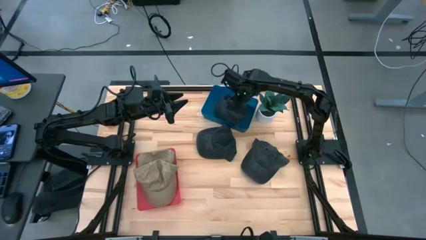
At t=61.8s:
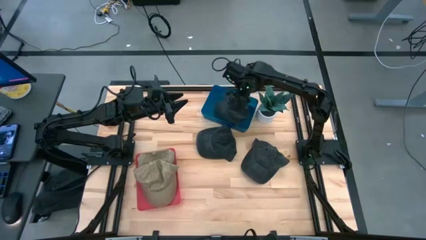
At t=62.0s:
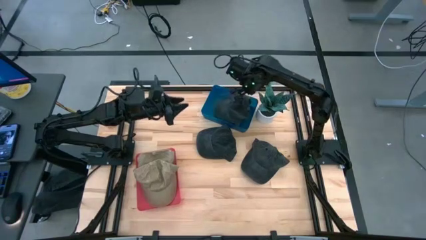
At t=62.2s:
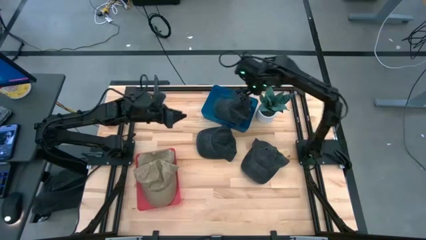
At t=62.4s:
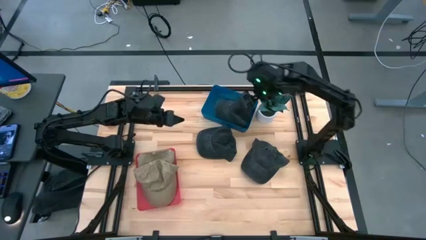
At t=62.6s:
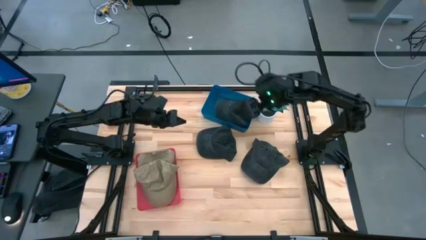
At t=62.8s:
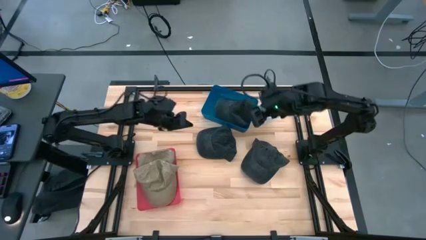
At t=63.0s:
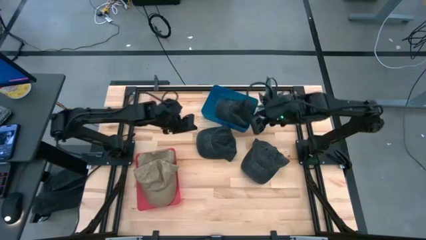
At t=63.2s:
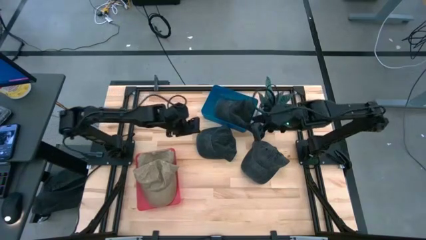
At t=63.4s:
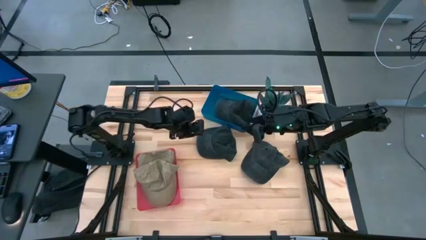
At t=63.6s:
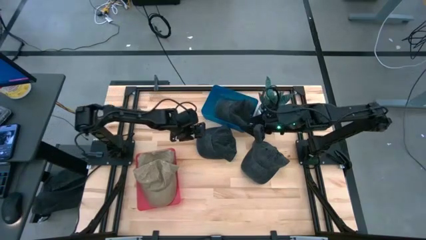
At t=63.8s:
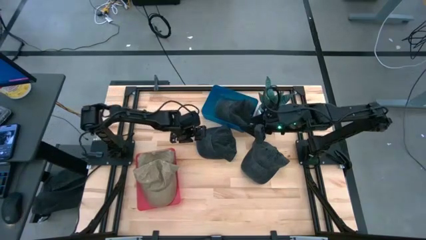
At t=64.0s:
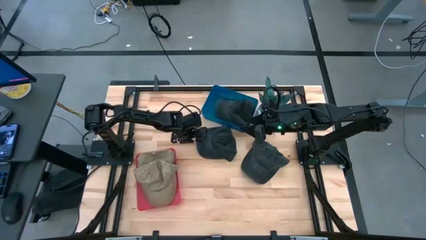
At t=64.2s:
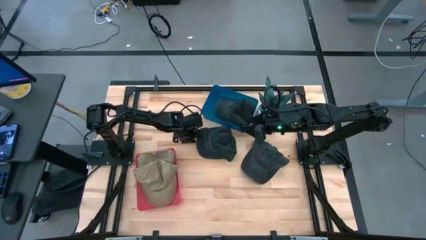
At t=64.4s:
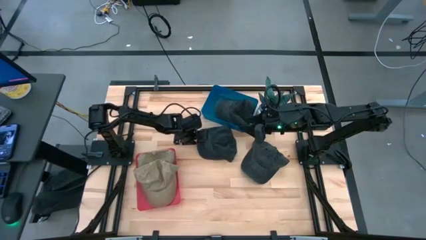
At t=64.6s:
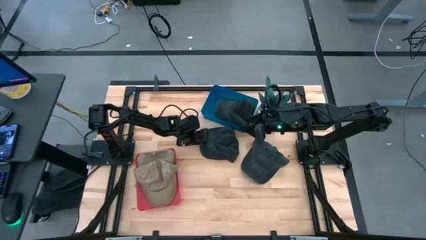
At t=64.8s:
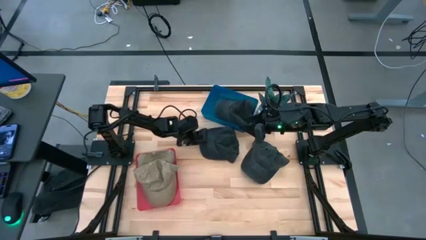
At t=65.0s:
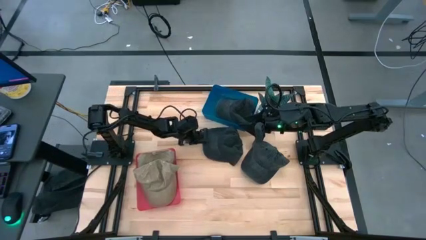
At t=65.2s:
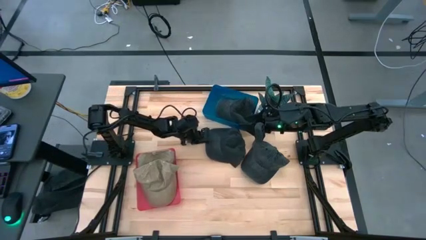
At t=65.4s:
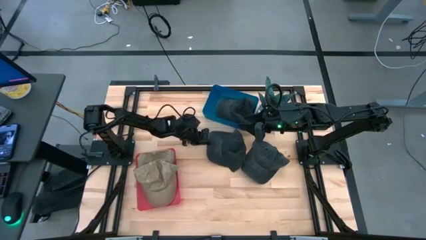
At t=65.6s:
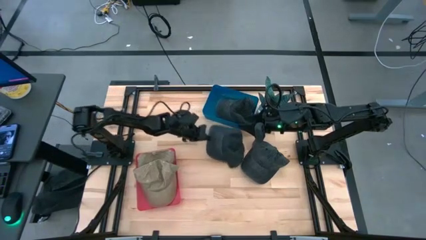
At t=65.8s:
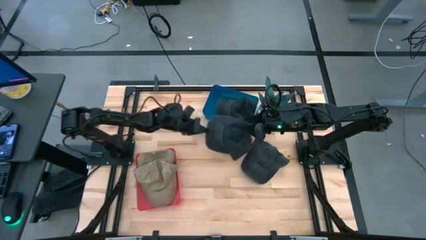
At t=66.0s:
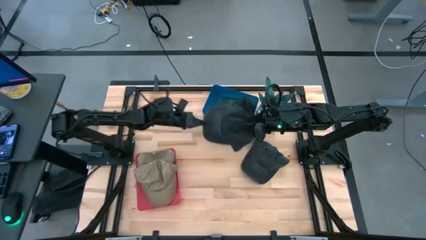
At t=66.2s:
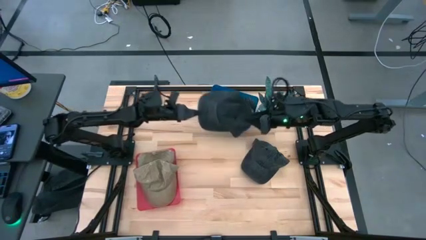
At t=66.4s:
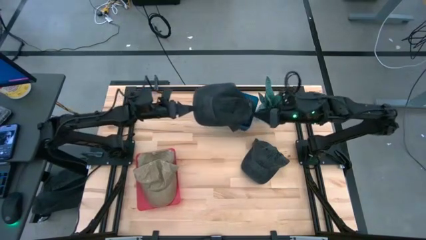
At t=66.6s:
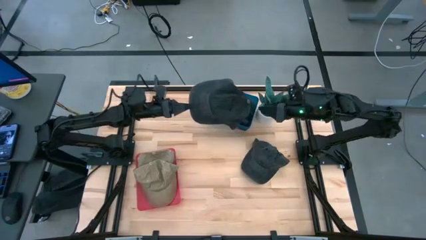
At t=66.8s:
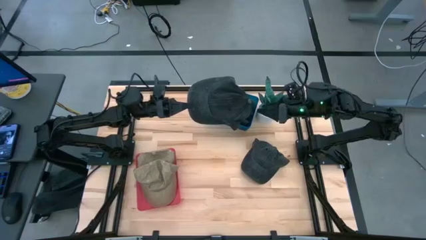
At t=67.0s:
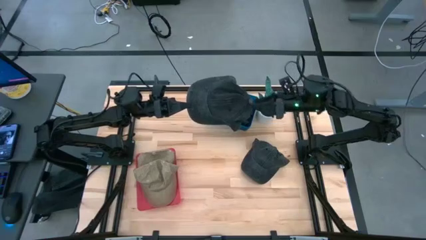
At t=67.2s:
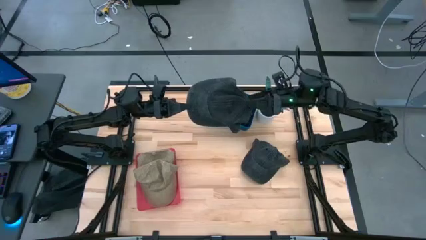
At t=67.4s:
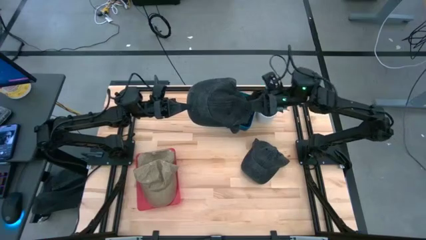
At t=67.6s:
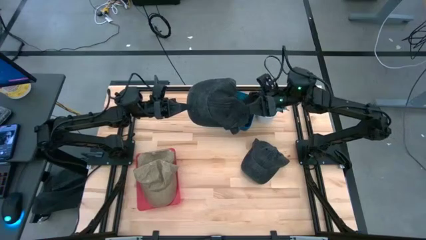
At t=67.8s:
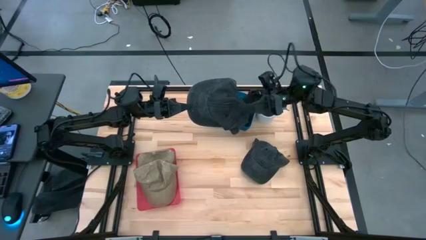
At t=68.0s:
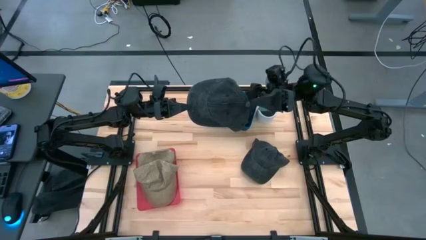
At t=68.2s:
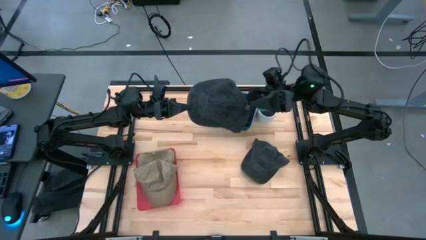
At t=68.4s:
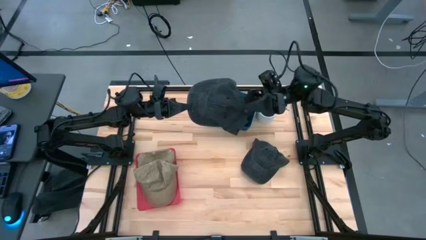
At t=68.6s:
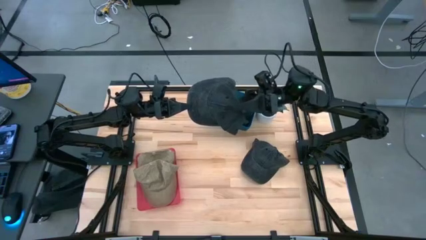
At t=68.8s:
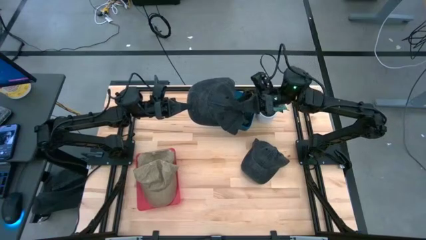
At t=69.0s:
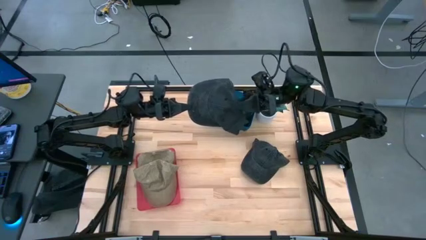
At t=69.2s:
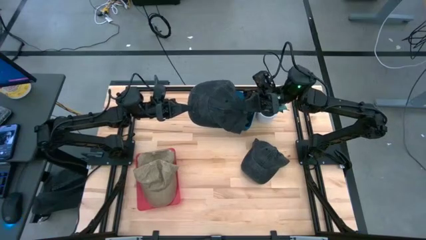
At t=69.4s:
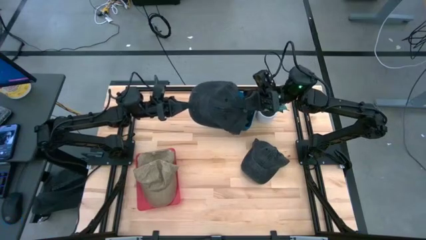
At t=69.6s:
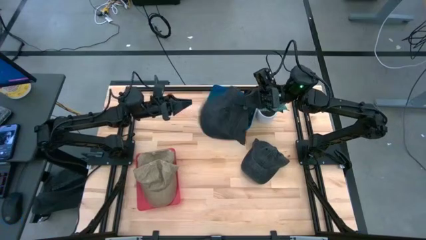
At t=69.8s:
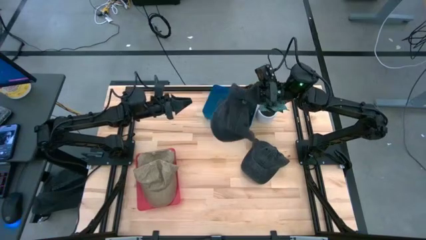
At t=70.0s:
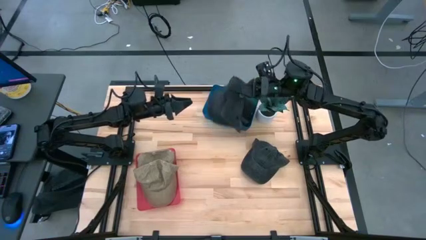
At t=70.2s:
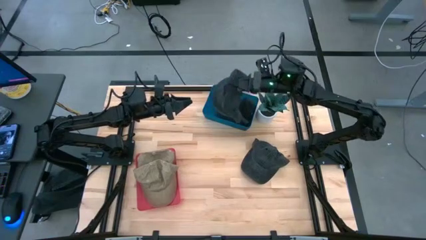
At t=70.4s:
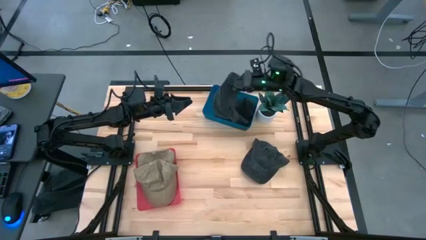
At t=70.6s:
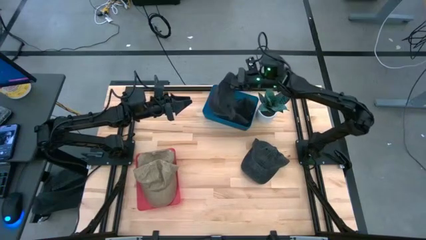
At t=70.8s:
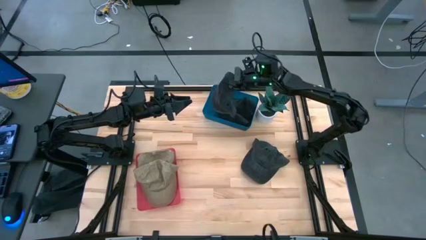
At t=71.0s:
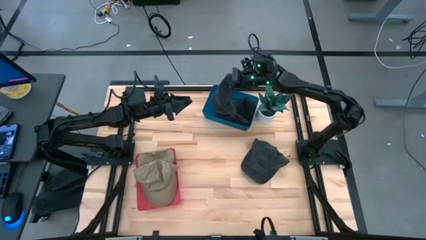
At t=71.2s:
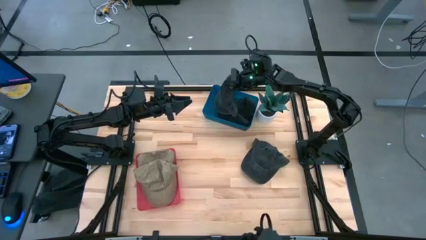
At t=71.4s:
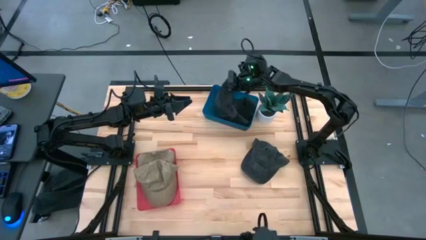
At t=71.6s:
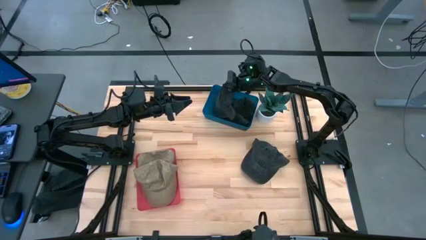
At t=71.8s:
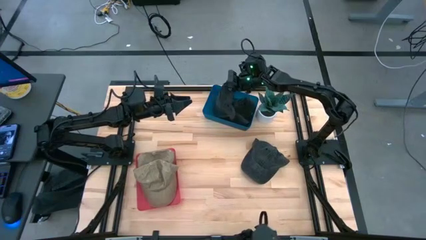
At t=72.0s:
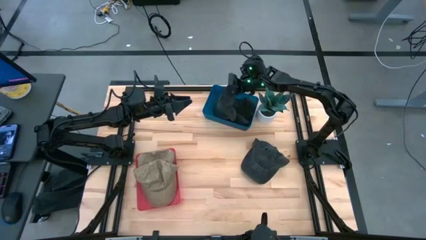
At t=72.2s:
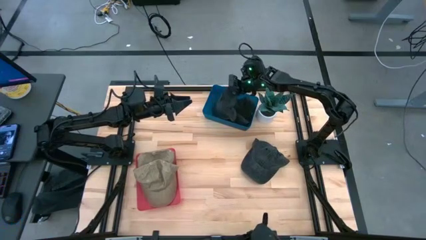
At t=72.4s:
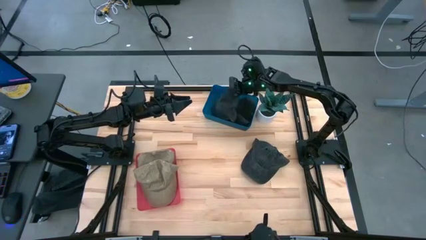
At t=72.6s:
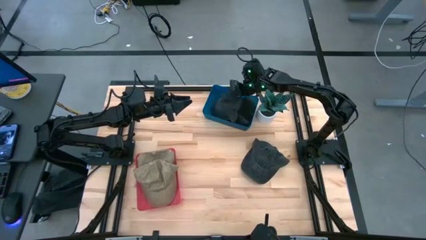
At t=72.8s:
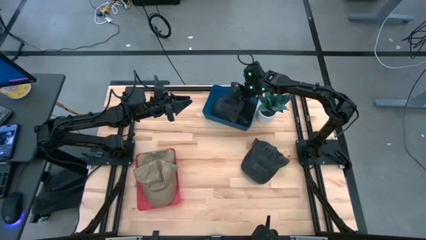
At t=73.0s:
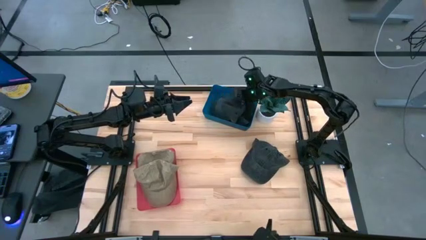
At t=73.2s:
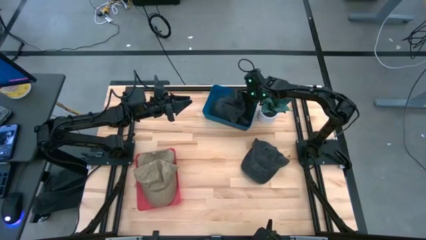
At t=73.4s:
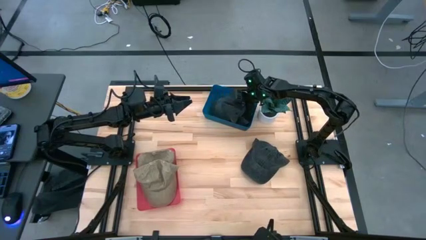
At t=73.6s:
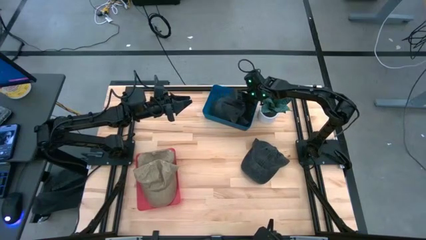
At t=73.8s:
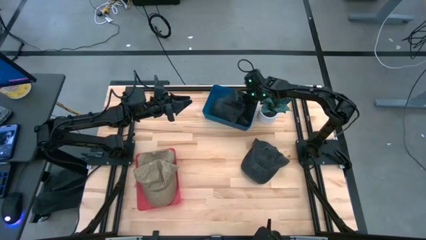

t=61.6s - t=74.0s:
Task: Pick & Place hat
Put the left black cap into the blue bin

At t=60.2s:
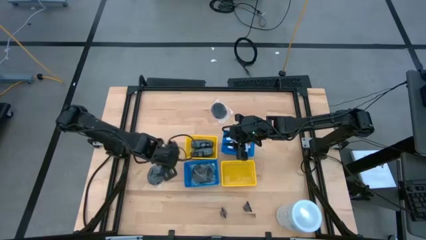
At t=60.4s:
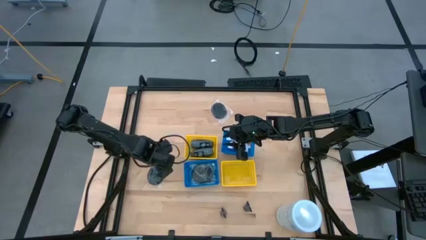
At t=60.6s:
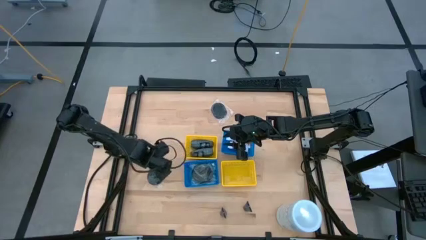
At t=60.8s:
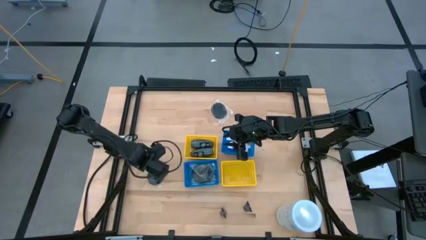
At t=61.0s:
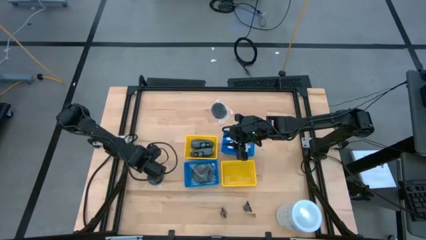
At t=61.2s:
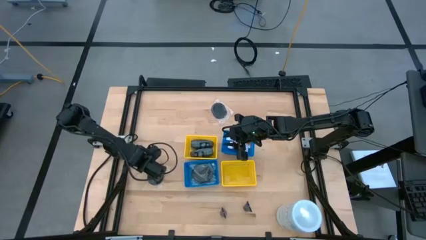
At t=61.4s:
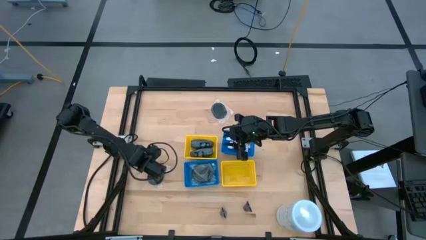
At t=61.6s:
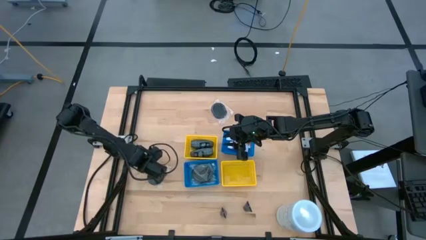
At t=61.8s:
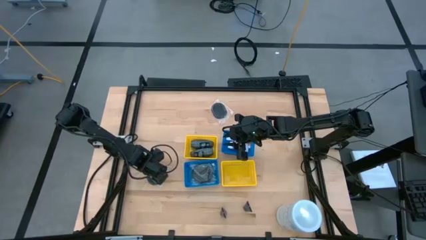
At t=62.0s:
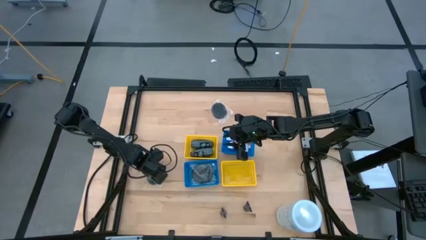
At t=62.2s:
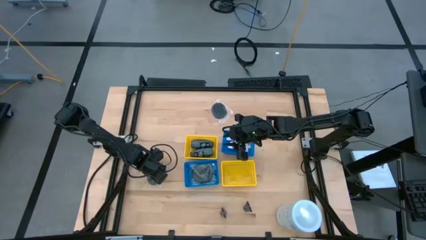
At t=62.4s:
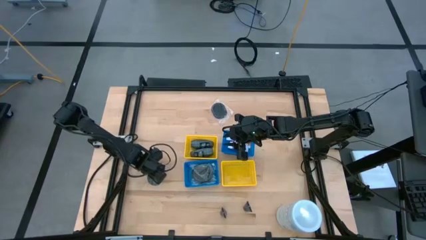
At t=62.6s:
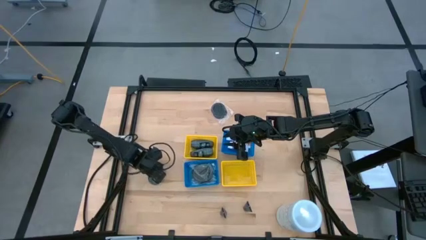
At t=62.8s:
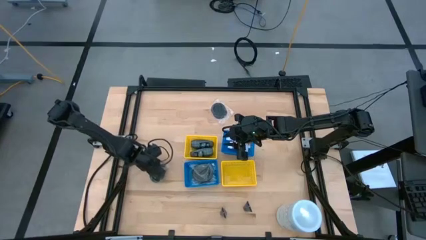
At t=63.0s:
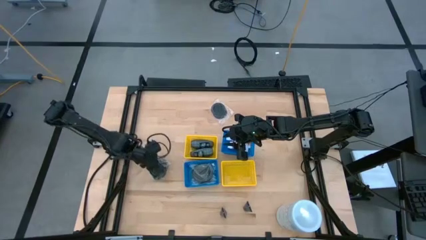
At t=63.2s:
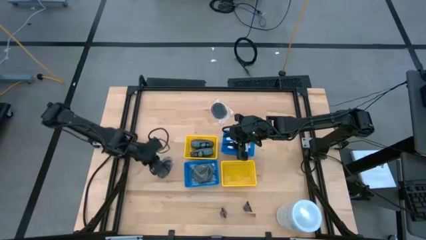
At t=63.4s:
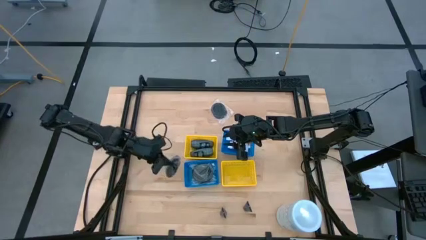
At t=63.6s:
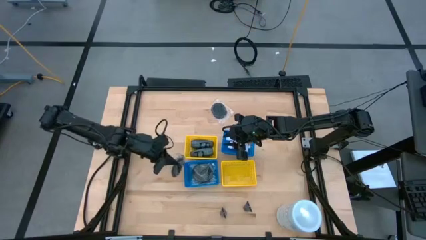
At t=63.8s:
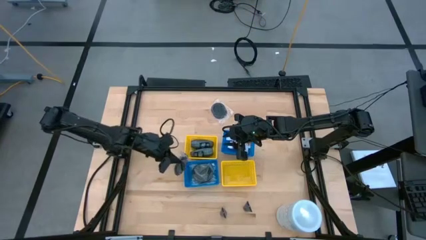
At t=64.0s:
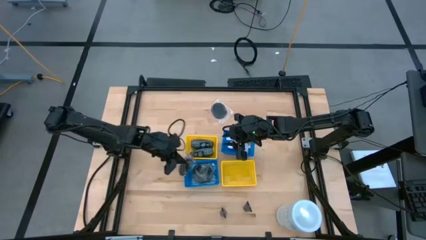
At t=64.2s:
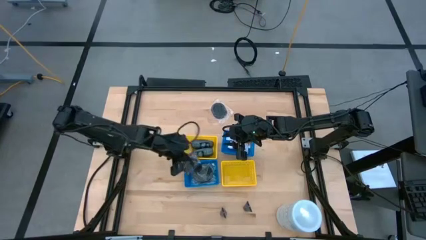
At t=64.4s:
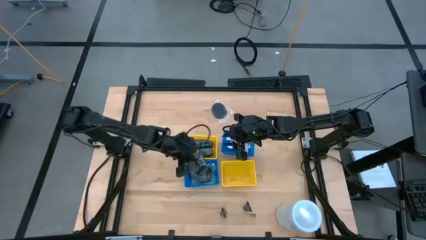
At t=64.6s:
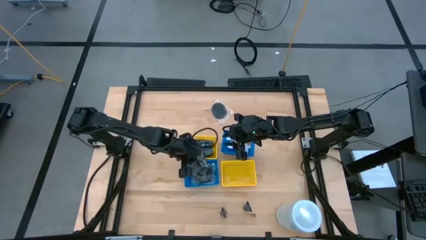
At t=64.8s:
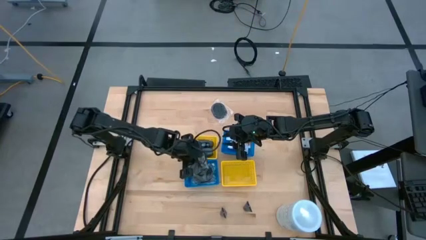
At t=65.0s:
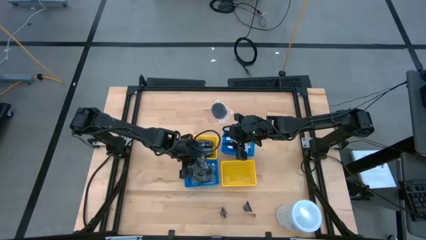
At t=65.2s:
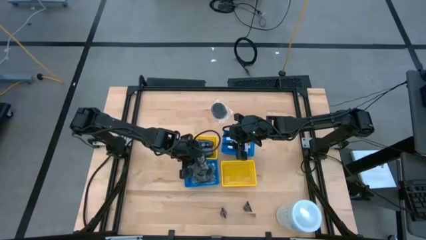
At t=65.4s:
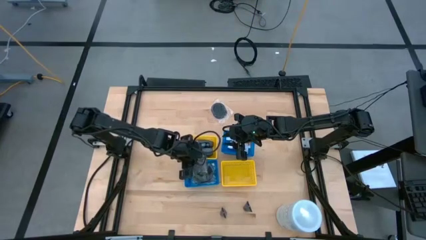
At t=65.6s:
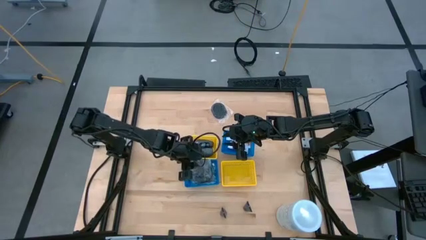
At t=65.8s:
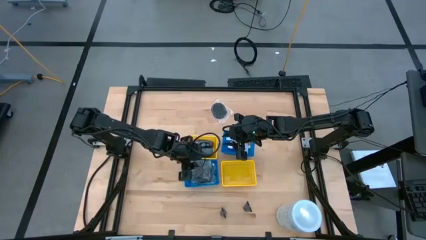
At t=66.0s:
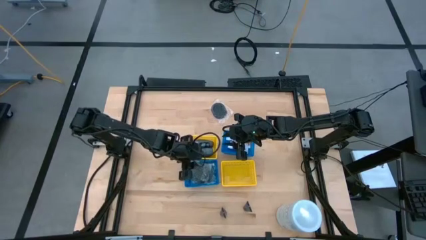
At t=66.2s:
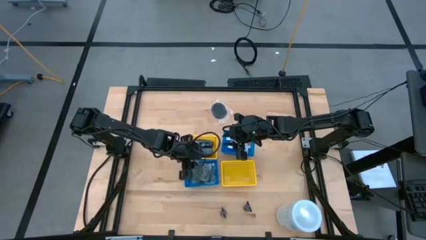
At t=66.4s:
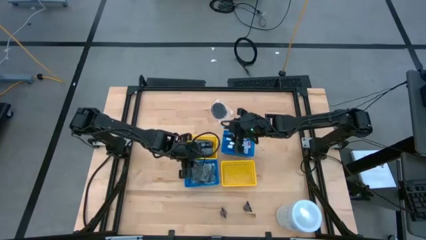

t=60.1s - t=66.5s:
Task: Pick & Place Travel size toiletries
Put the left hairbrush into the bottom left blue bin
